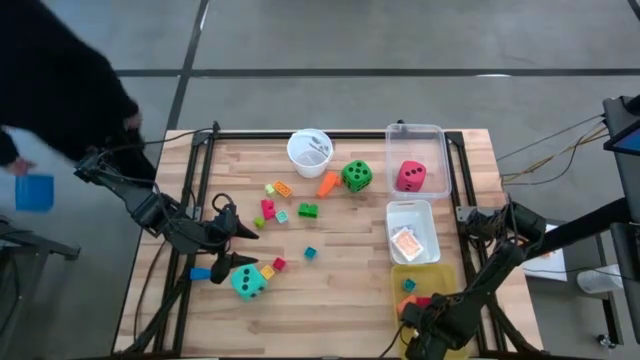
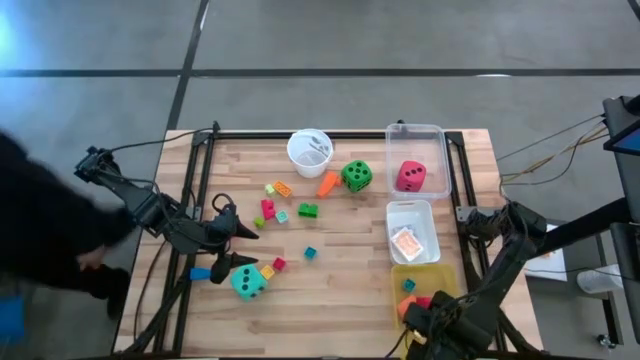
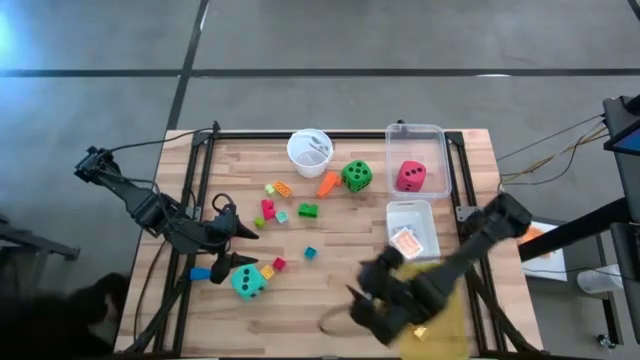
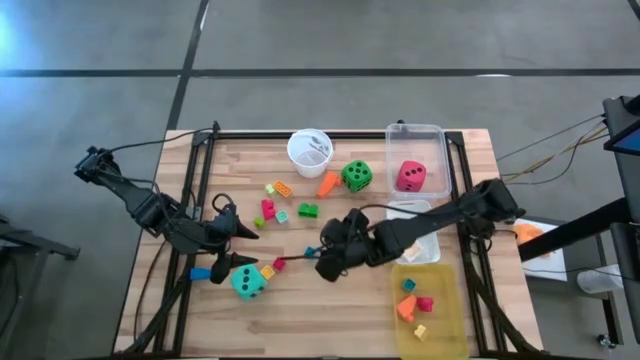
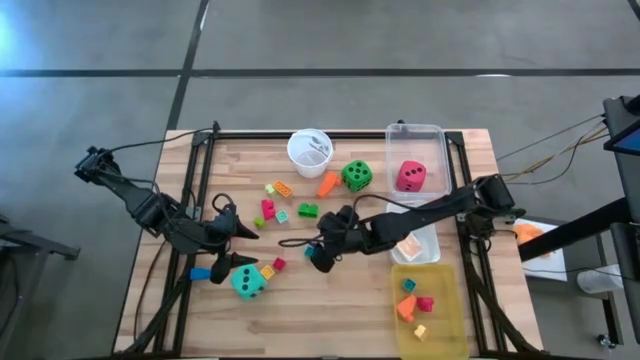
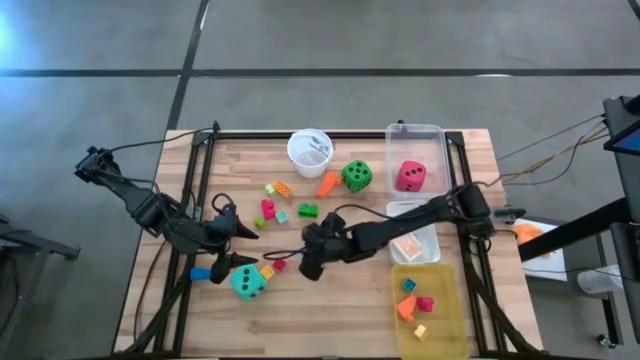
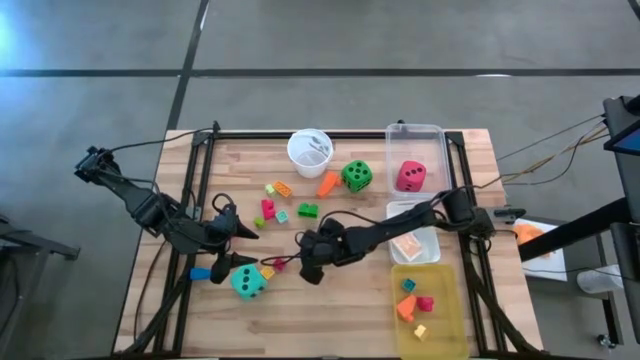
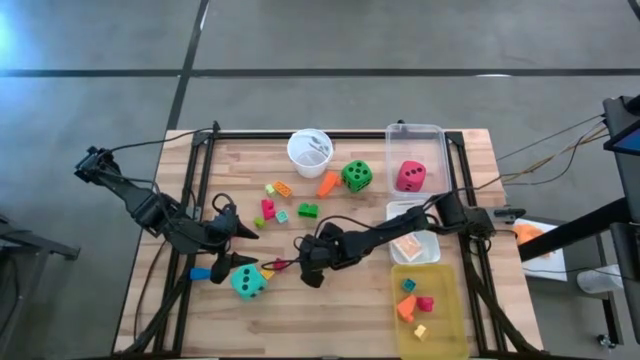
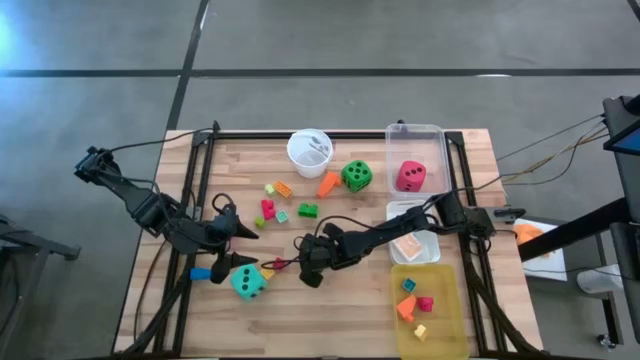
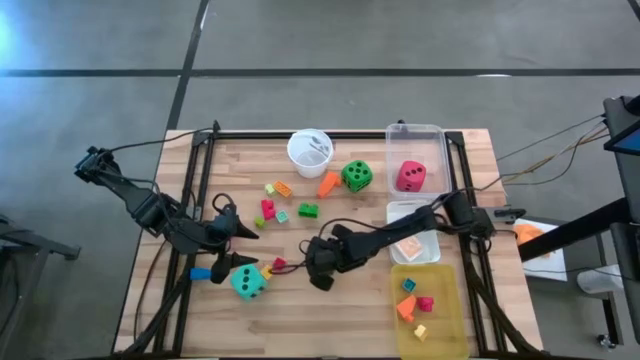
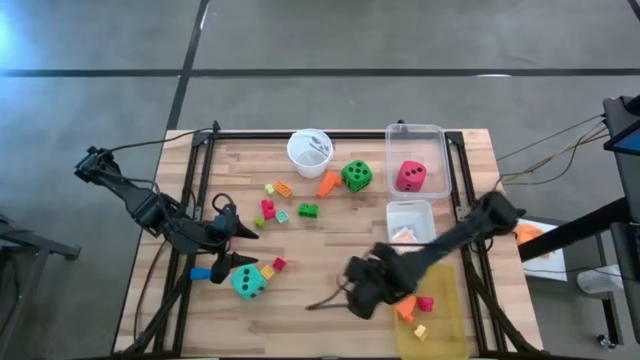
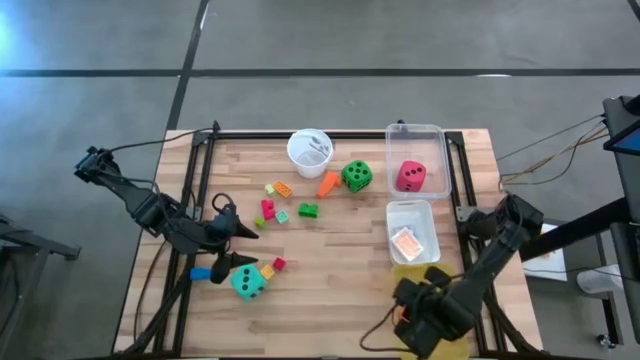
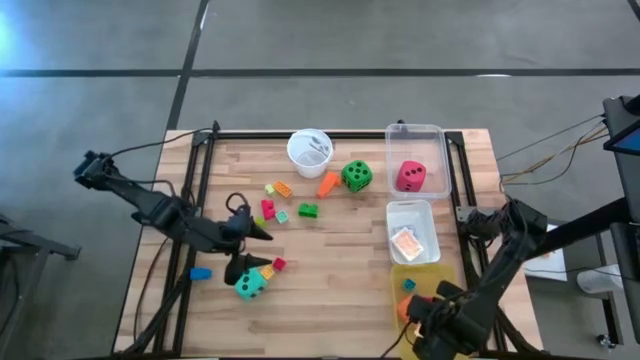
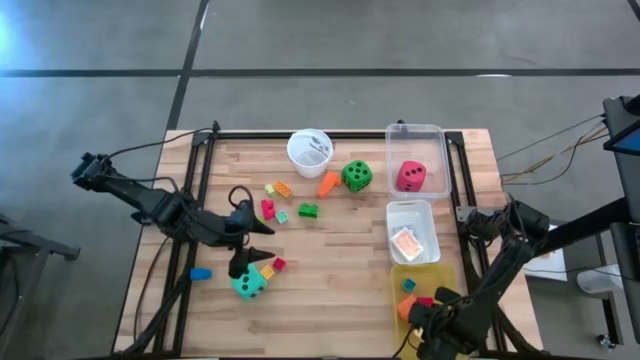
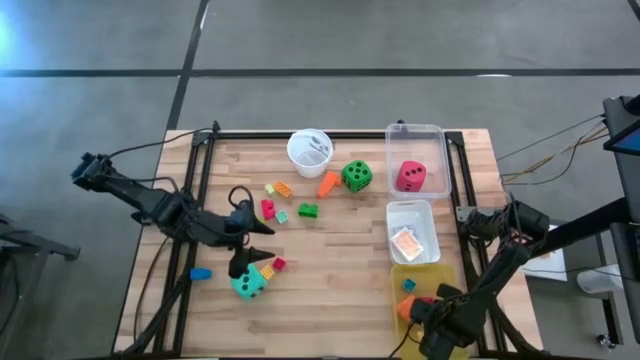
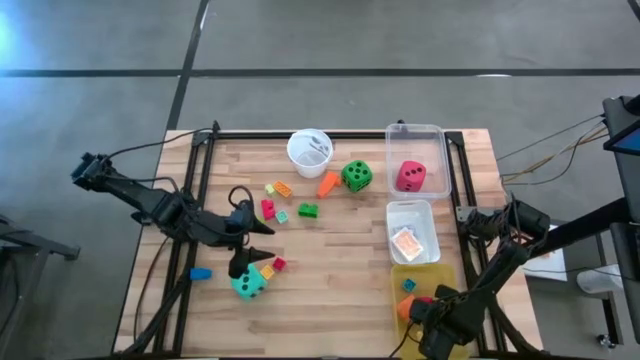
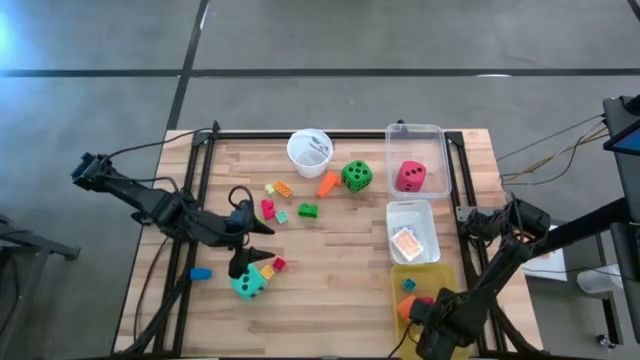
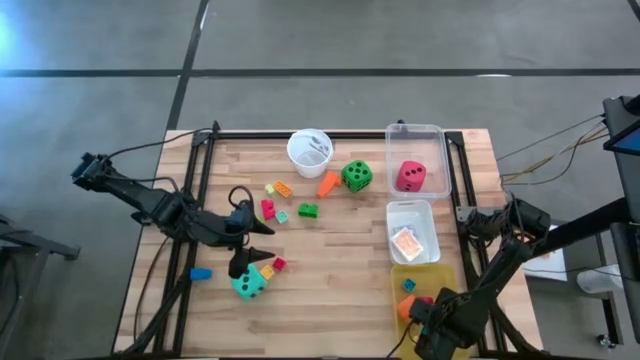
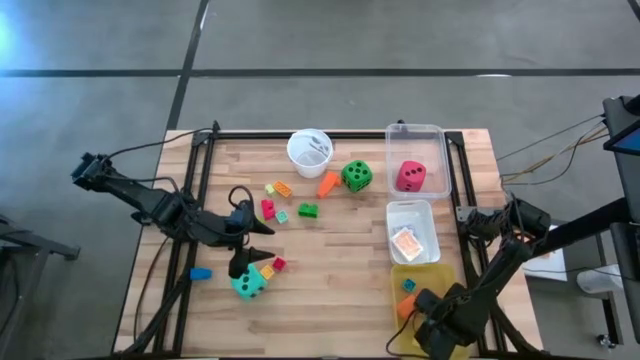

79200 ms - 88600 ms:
Task: Pick & Place Toys
Put the blue game piece into the yellow bin

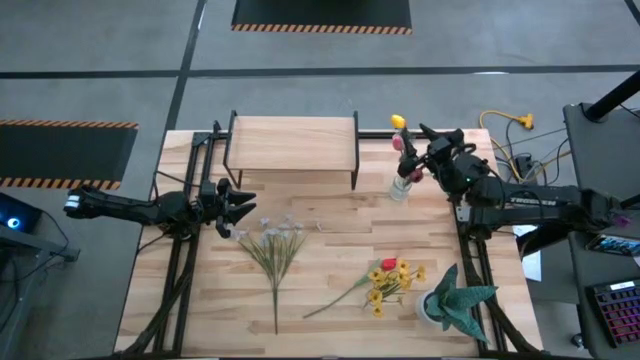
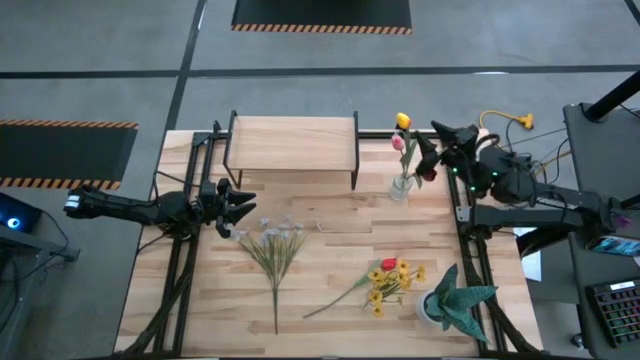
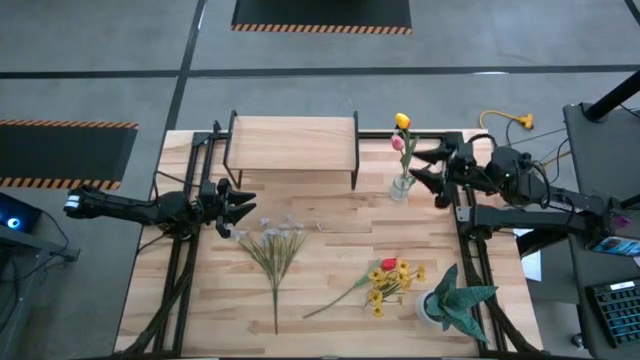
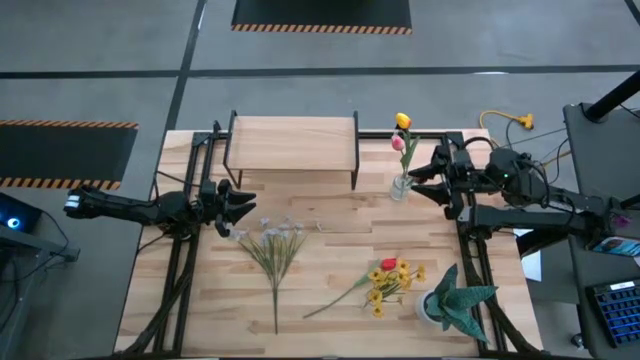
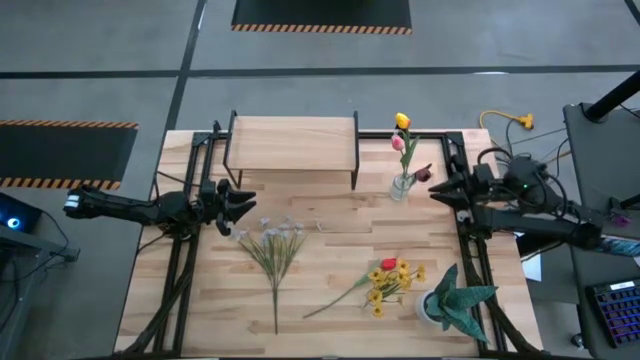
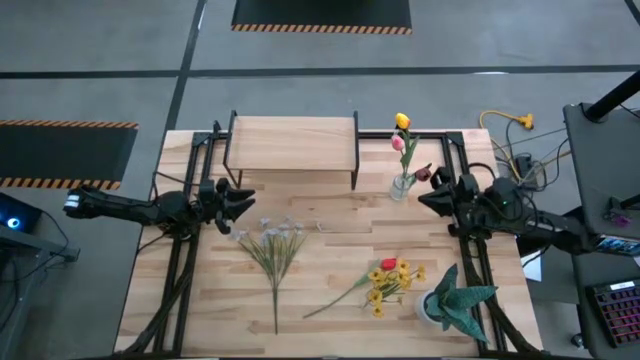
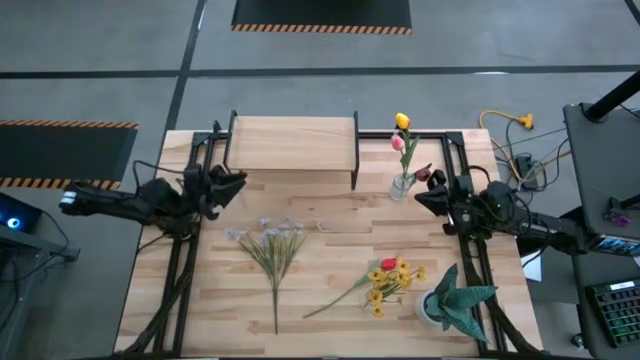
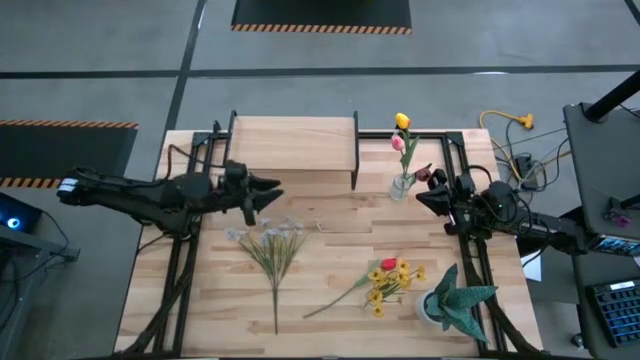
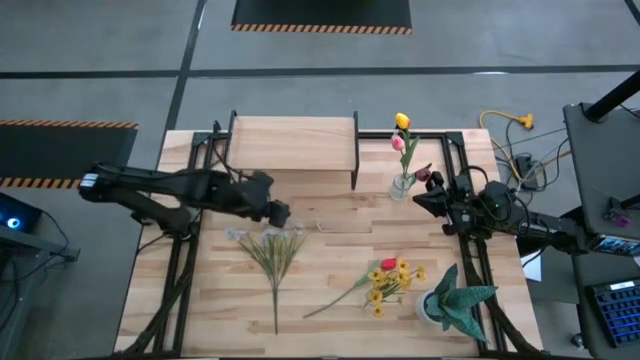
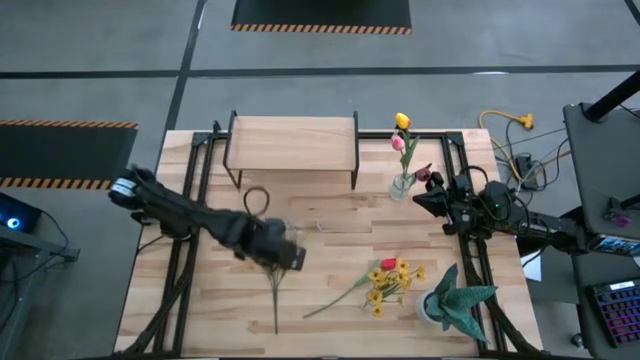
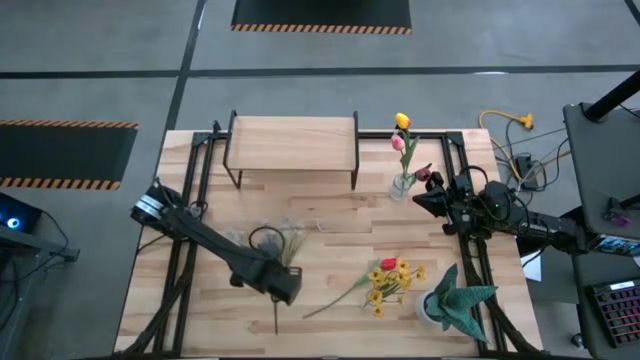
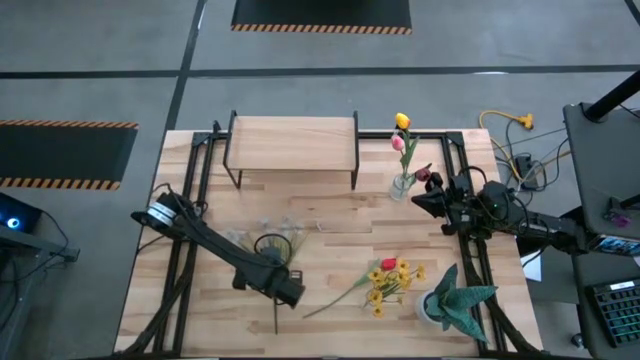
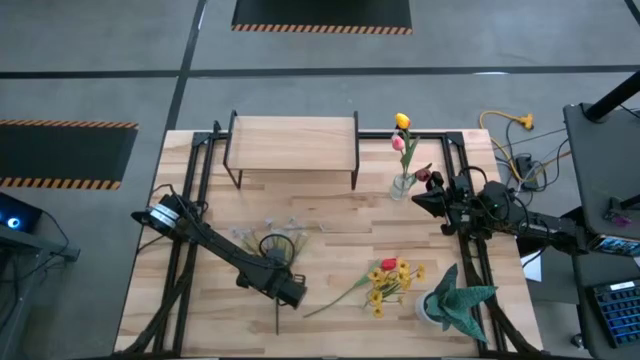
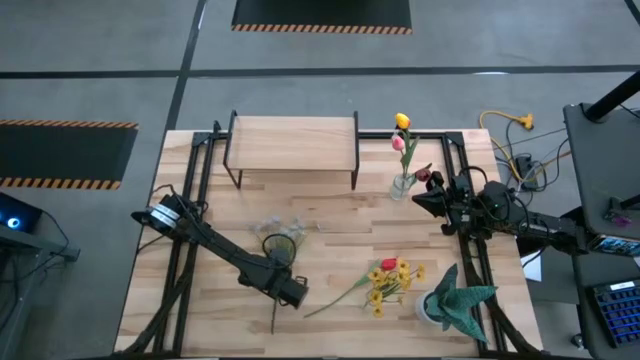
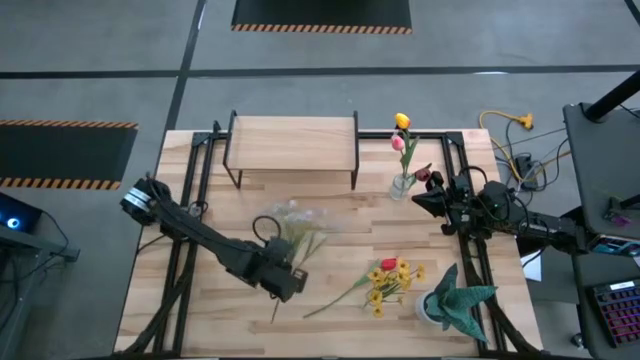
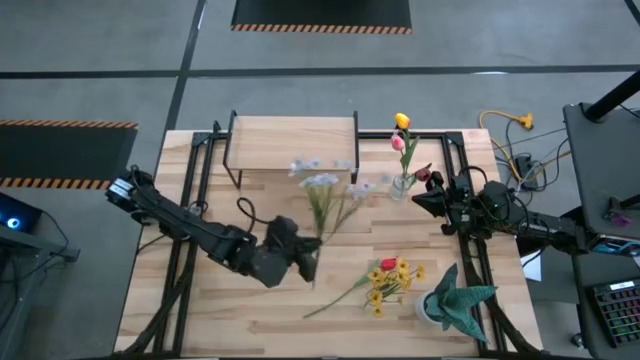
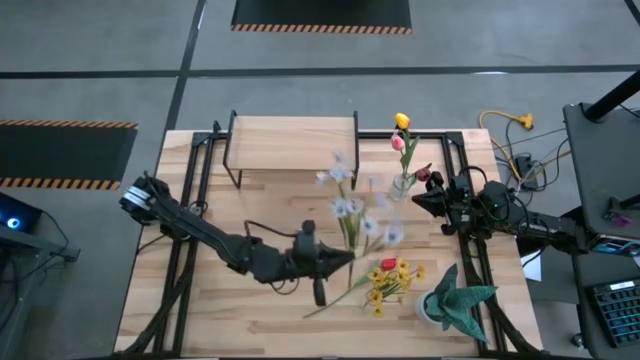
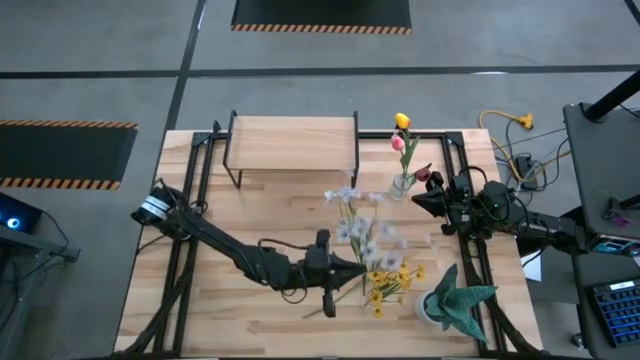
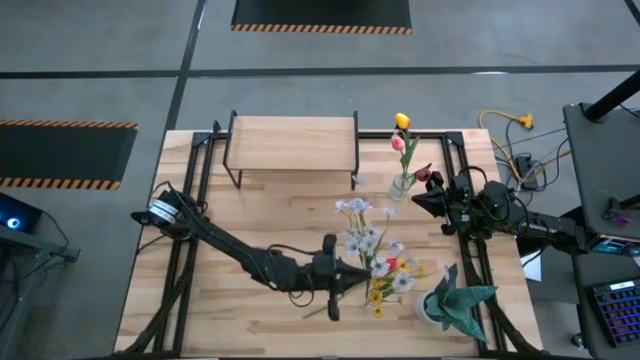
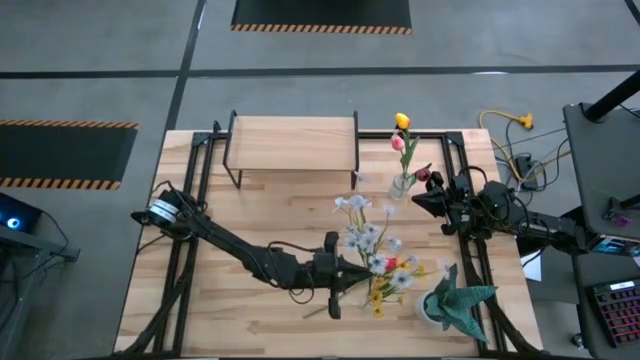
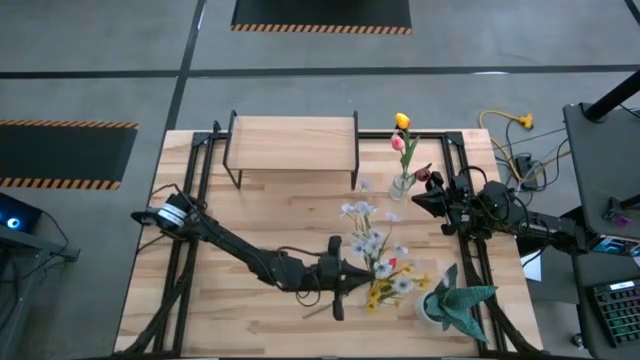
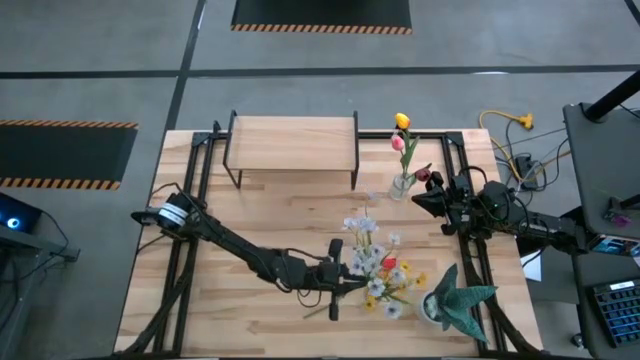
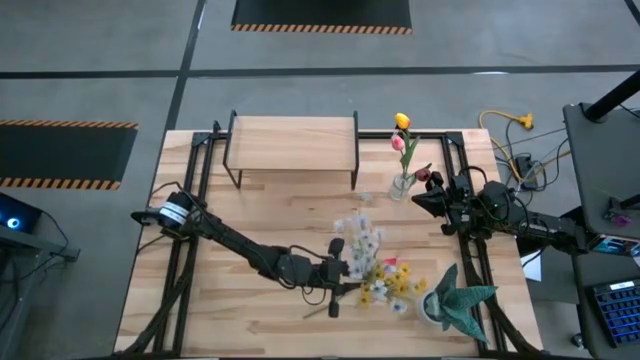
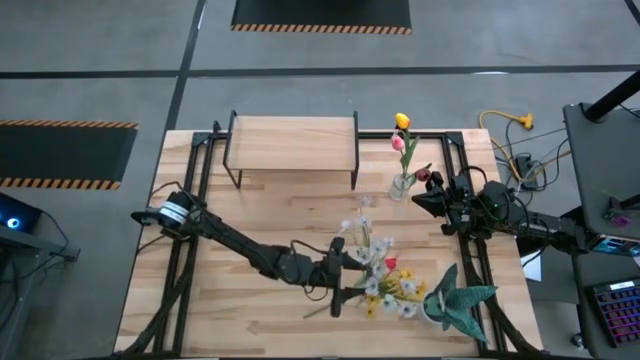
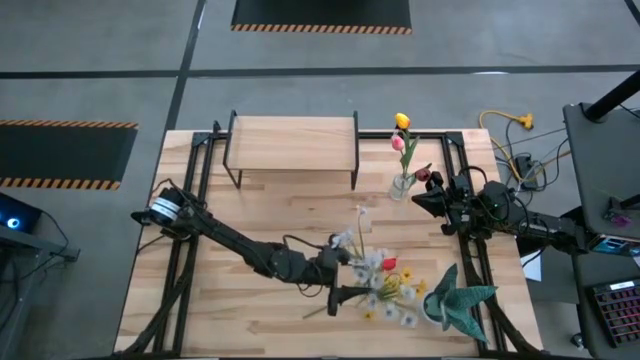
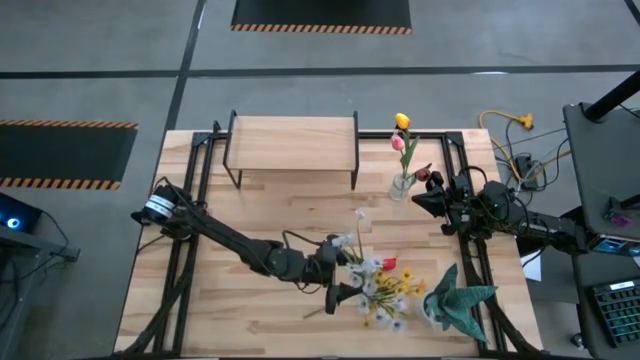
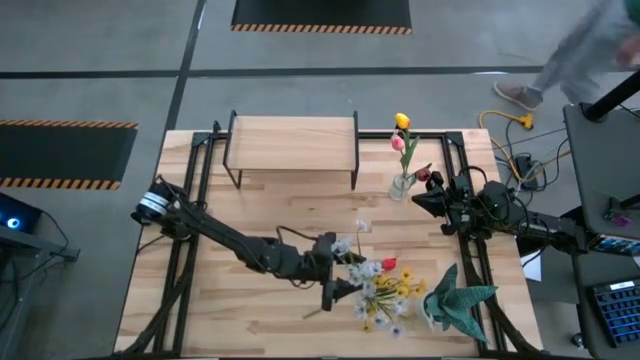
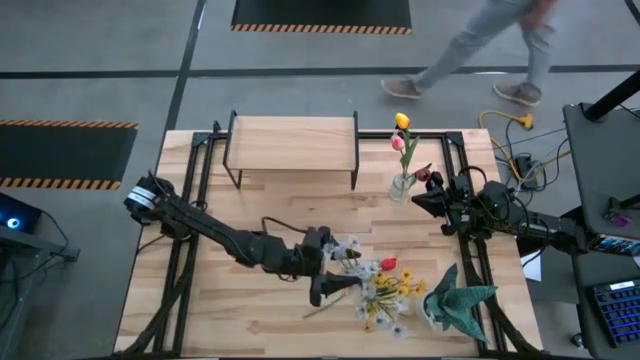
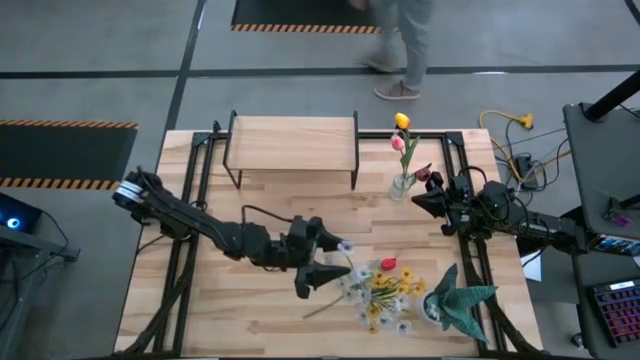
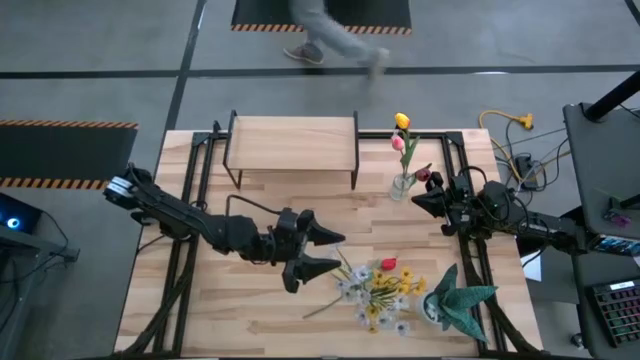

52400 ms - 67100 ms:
Task: Pick and place flowers into a vace then onto a shelf
Put the white flowers into the bottom transparent vase
